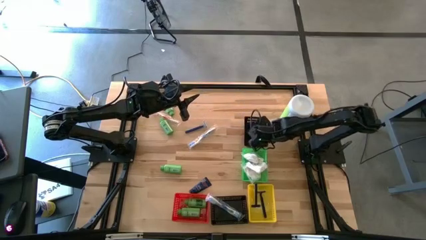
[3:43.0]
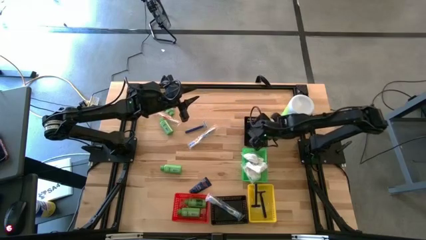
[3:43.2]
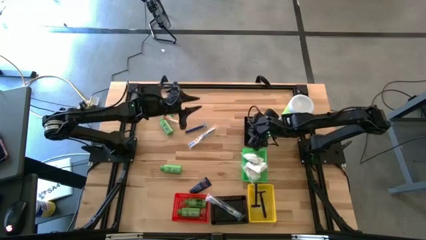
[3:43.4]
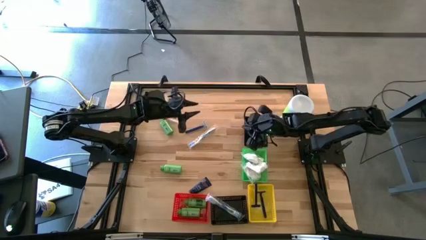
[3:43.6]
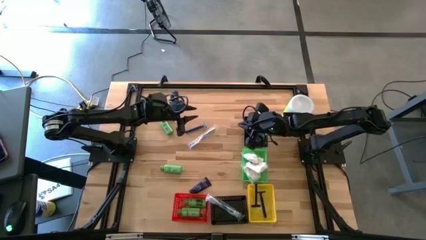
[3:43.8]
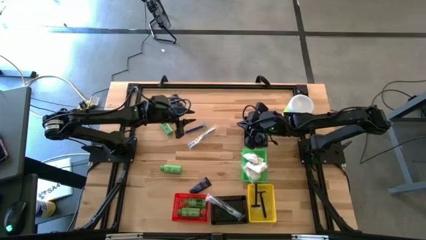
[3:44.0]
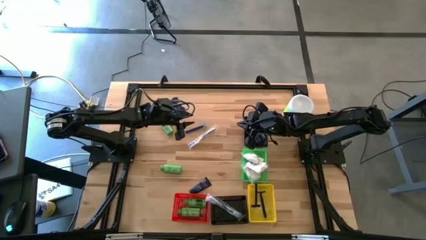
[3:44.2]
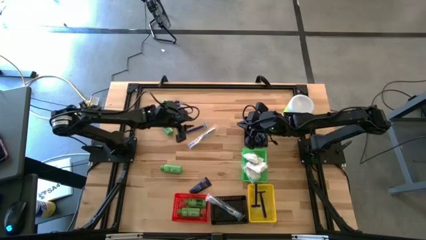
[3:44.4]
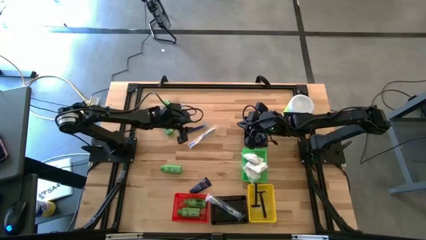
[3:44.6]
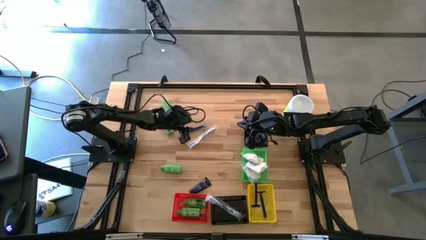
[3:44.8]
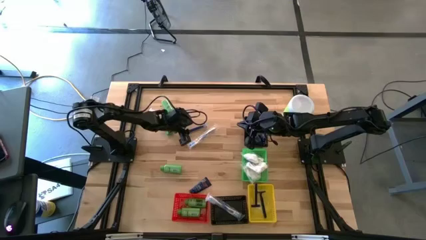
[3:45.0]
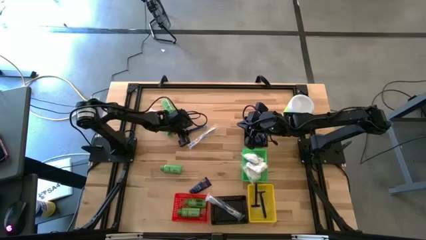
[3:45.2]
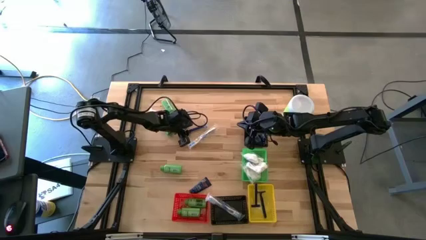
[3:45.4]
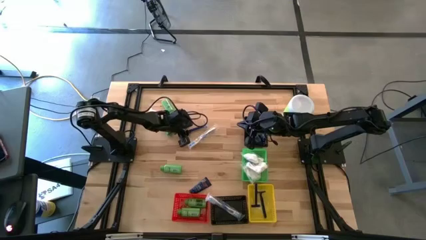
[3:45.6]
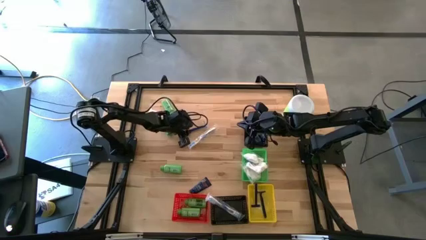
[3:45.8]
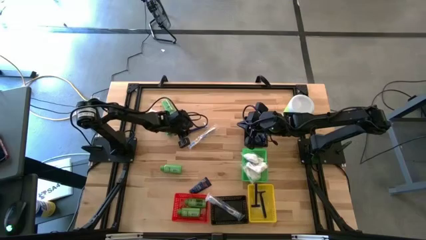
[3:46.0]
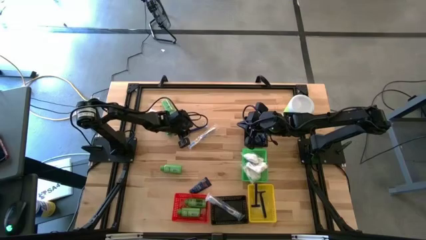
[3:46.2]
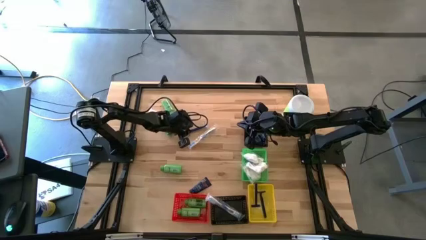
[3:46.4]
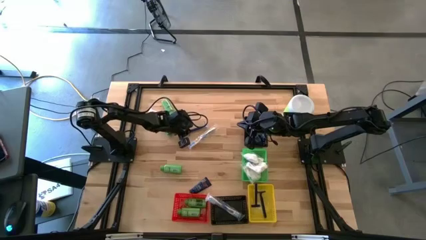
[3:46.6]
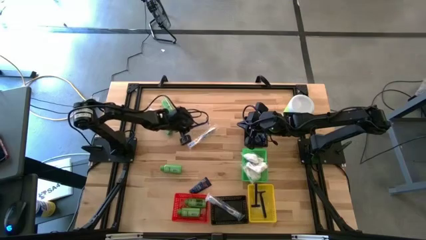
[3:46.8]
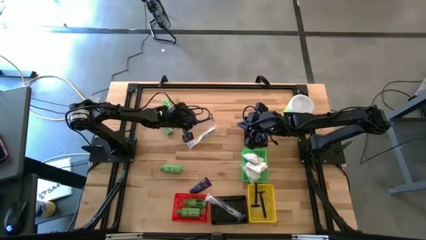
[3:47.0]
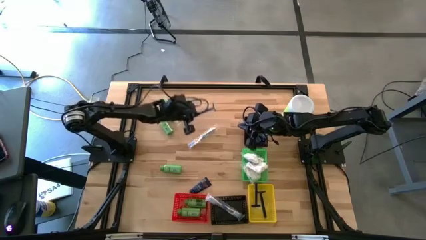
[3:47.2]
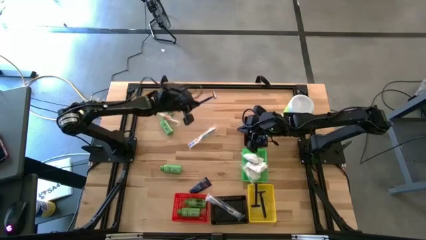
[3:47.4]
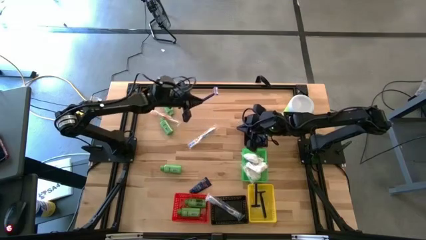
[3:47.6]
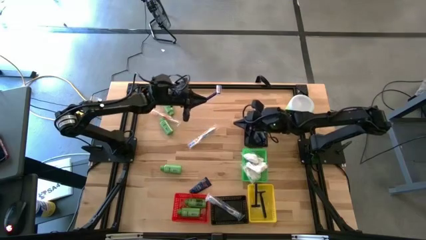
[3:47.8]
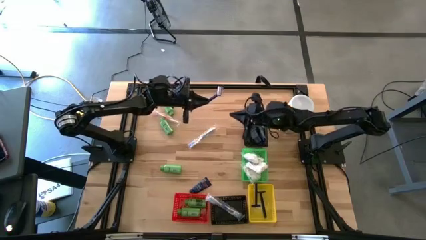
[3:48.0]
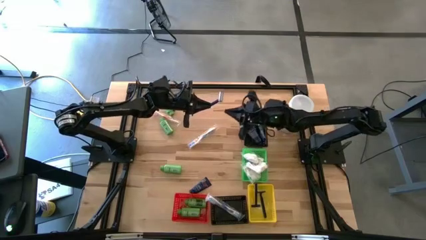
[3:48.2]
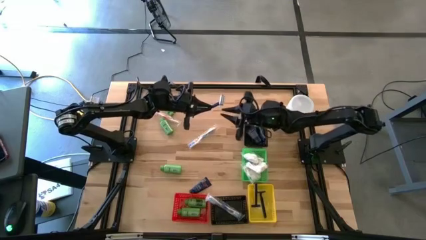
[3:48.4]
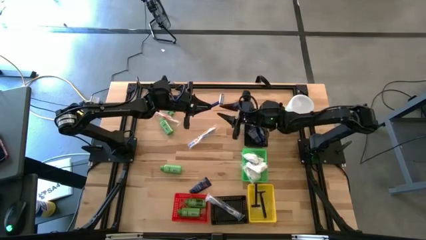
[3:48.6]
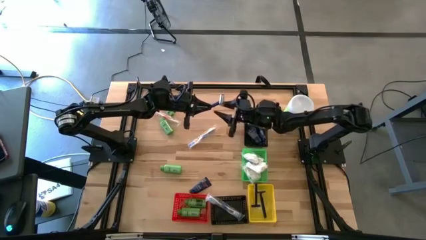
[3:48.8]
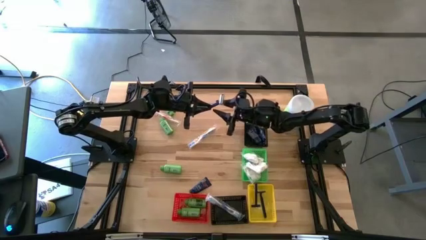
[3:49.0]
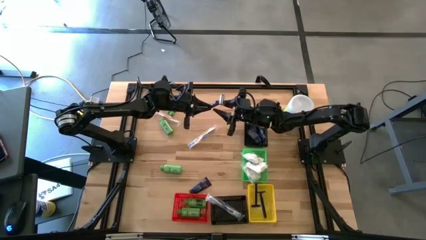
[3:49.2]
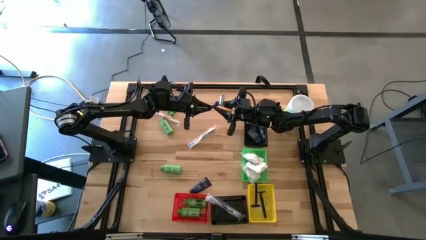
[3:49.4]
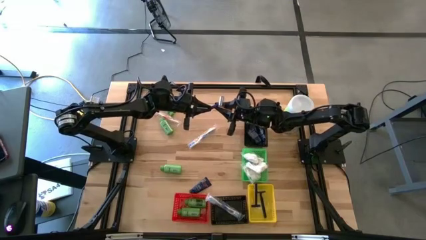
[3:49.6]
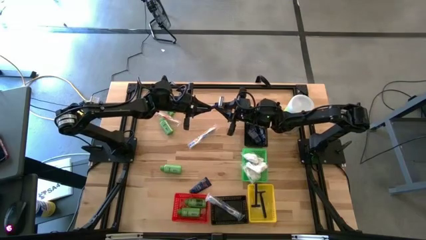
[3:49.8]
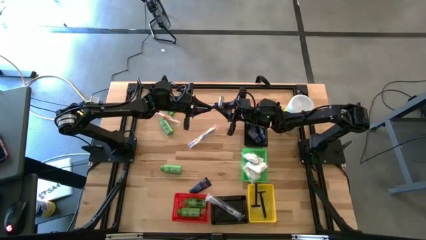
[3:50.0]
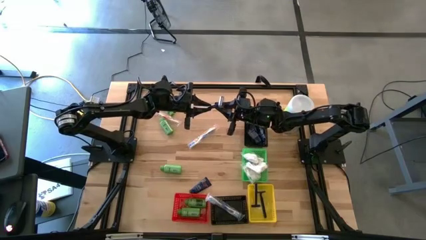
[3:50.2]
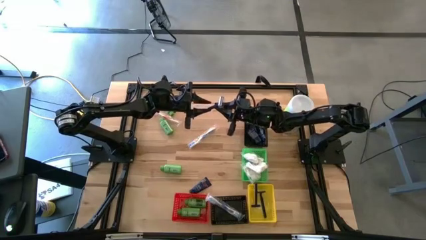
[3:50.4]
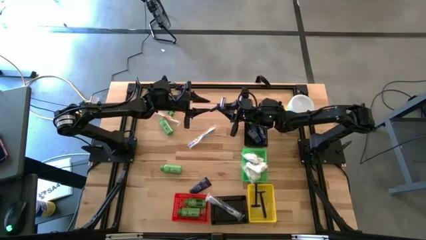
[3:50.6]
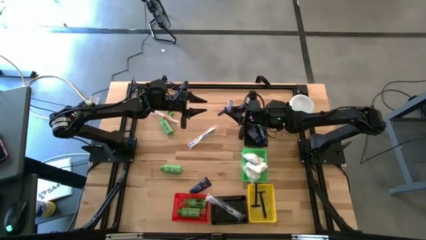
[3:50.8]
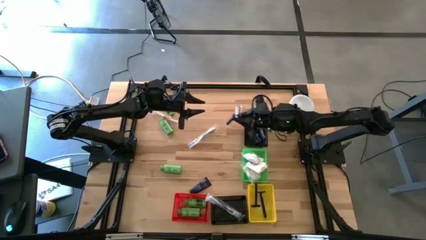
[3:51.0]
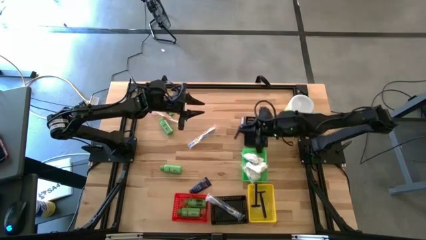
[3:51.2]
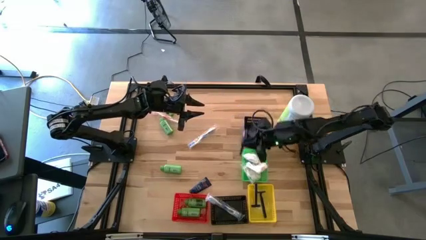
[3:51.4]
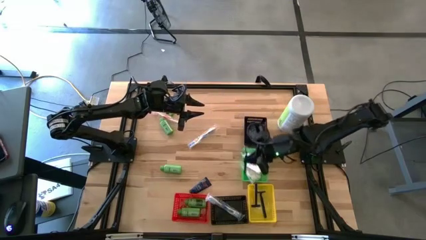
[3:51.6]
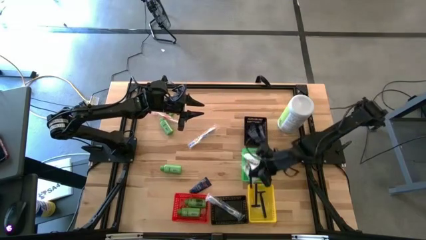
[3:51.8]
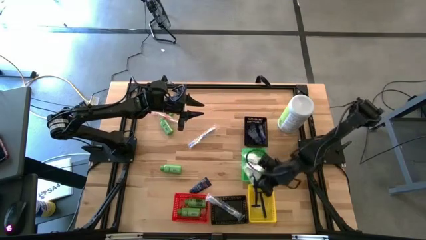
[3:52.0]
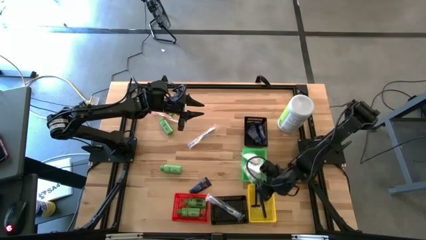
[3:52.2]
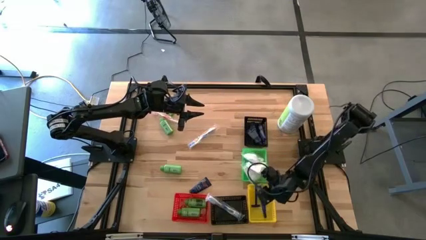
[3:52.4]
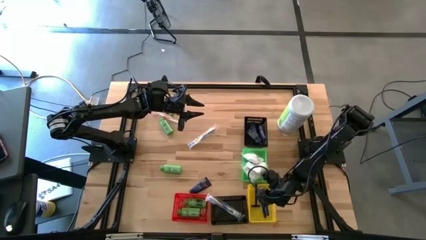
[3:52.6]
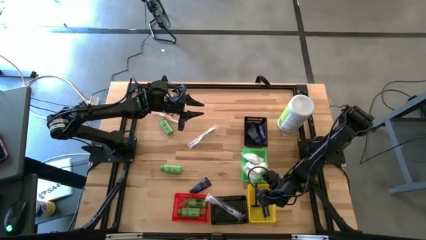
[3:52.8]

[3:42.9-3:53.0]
Task: Pick & Place Travel size toiletries
Put the blue razor into the yellow bin

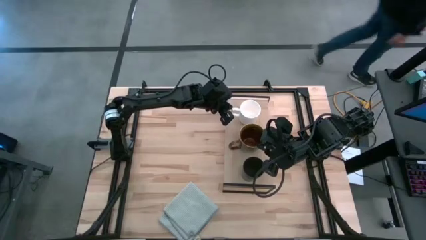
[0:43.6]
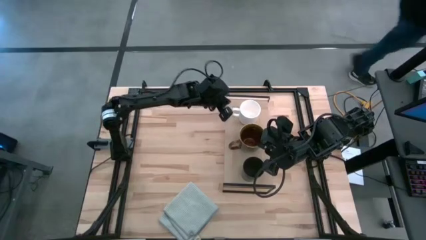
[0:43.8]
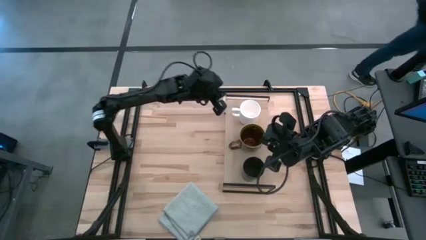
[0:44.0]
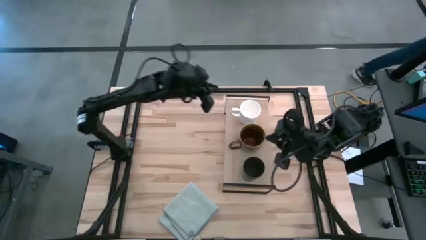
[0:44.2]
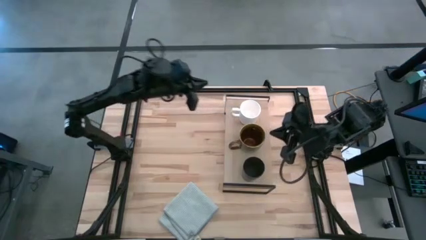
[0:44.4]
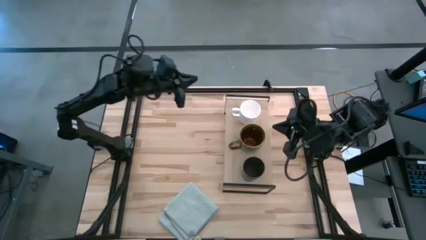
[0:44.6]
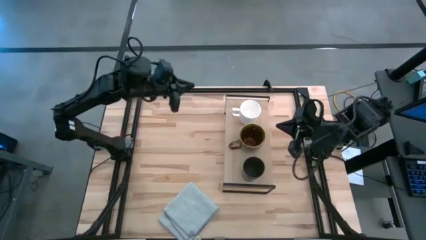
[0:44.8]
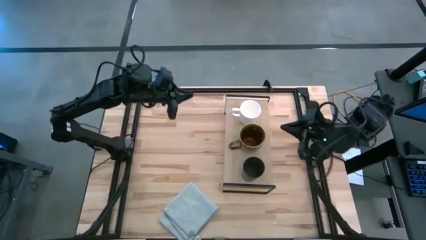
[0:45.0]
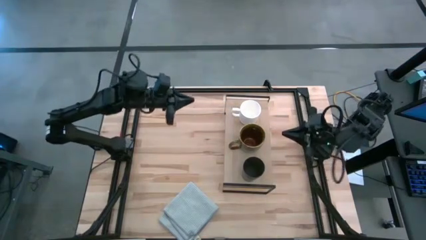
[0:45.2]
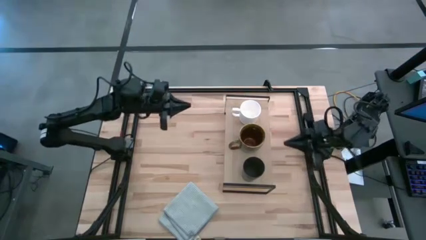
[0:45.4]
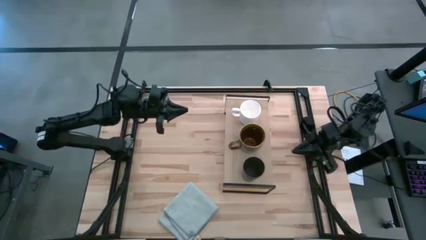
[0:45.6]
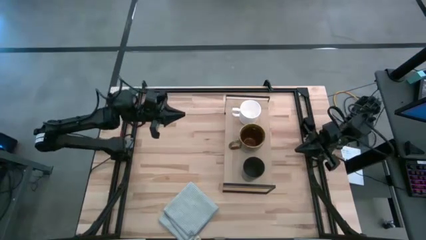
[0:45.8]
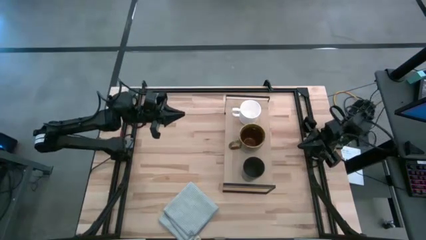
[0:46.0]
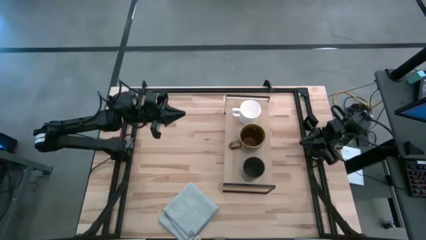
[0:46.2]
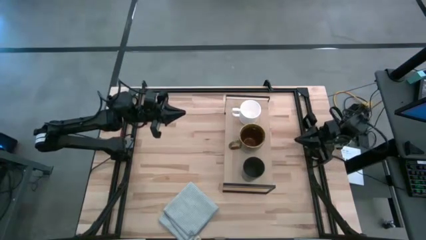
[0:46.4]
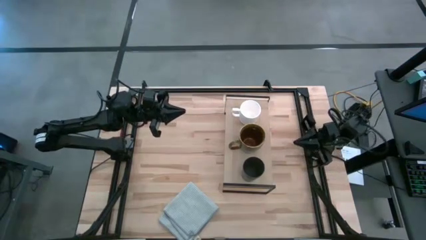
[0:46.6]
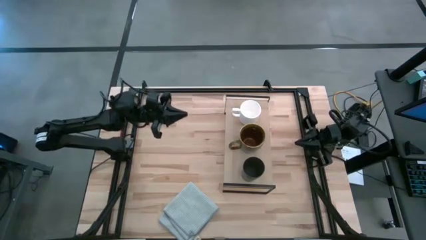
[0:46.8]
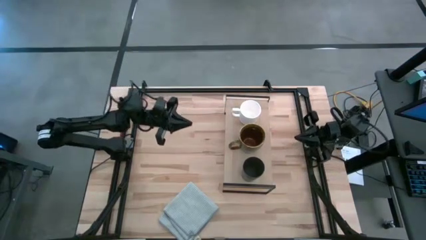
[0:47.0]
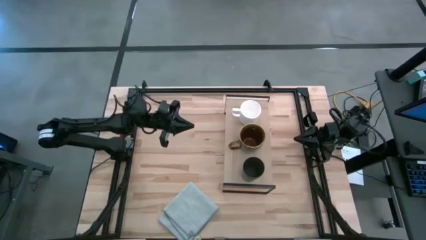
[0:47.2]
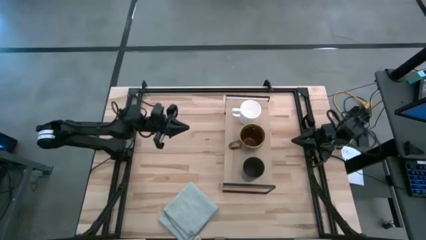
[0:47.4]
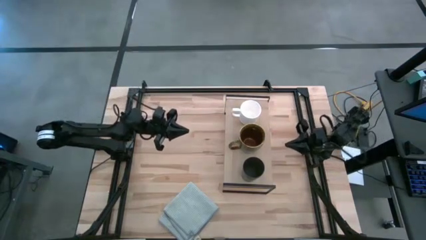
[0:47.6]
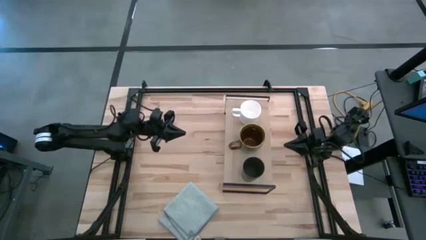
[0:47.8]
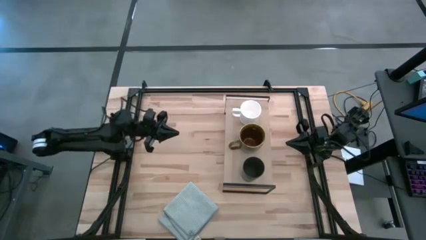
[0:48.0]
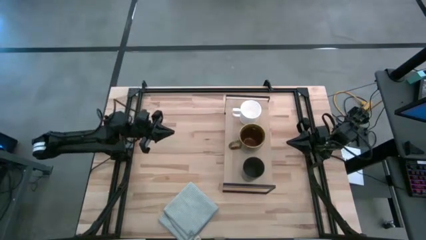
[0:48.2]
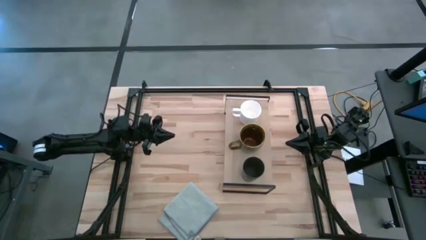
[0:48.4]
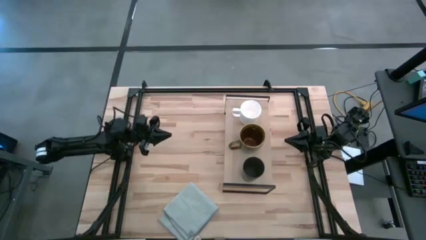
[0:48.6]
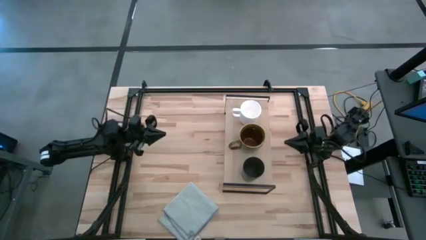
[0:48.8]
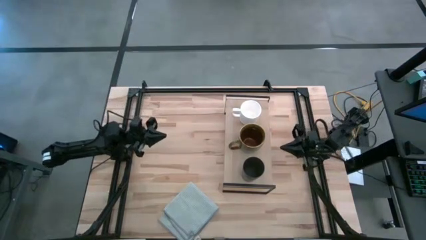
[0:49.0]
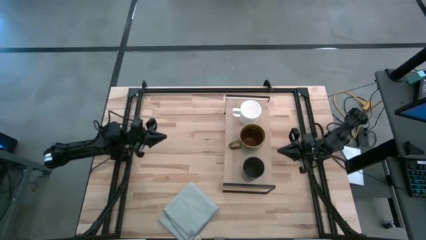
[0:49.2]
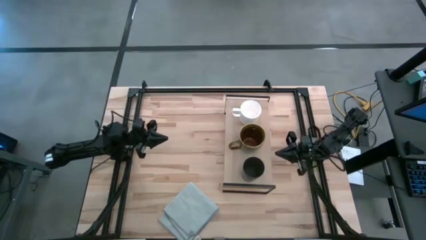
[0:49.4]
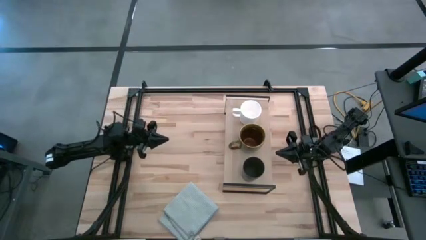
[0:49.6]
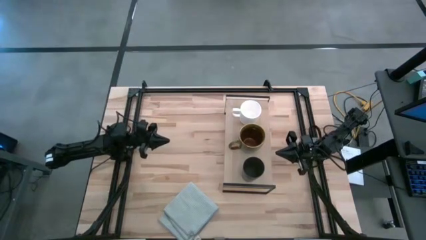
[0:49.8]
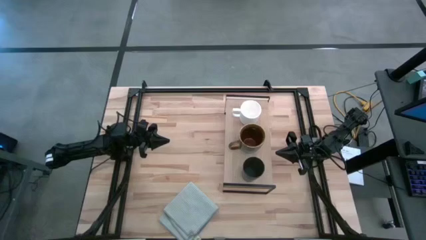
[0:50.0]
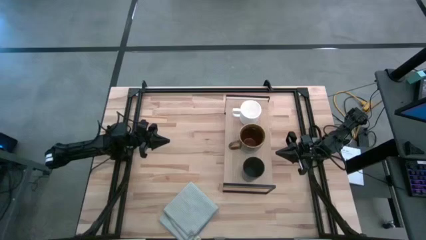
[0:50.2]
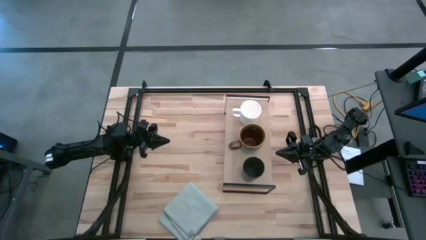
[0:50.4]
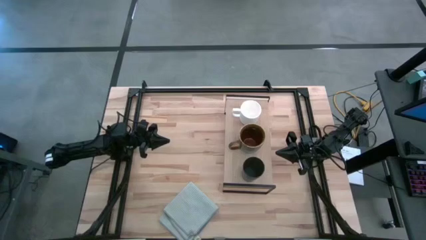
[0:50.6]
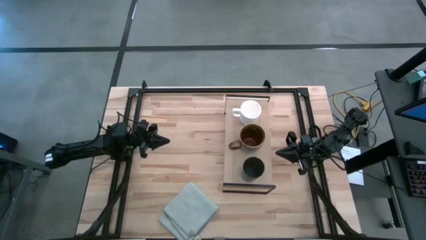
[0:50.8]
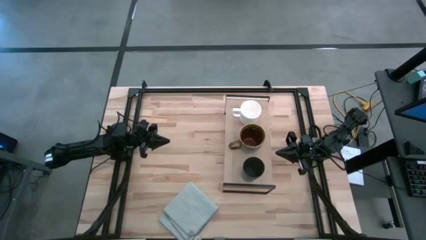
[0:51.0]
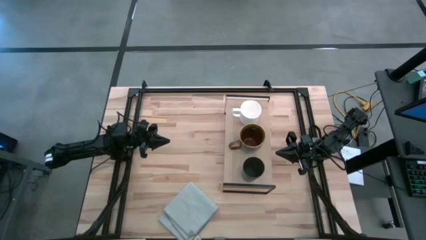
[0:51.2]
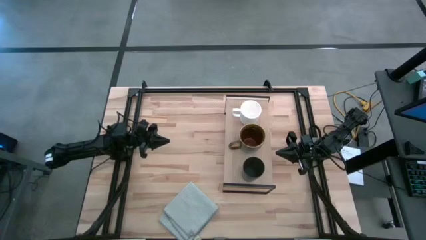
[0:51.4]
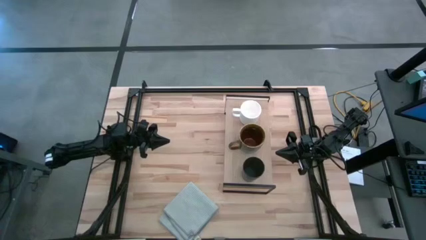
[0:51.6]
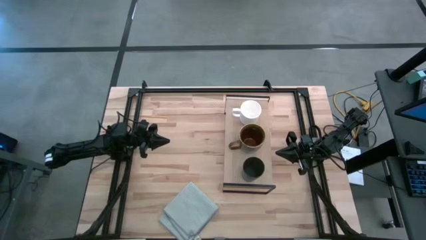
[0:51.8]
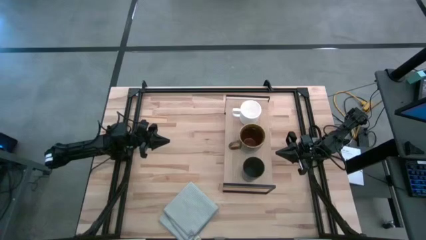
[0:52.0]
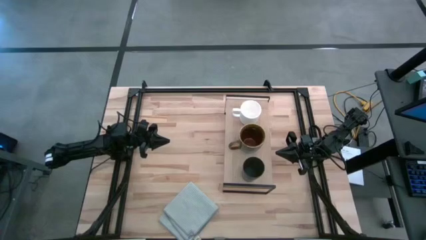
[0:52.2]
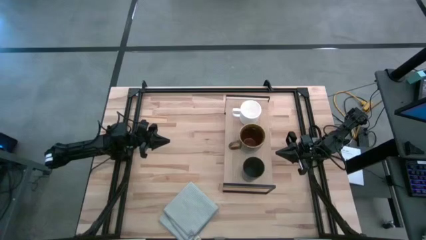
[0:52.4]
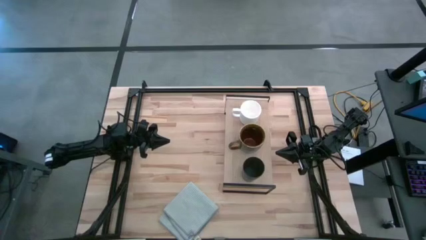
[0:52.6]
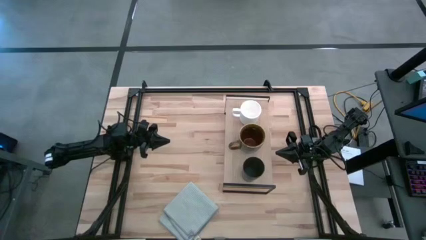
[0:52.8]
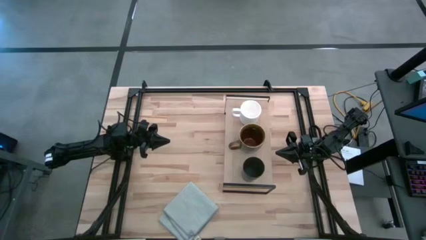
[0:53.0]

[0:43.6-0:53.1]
Task: Stack small to large cups/mugs on shelf
Return to Home Position
